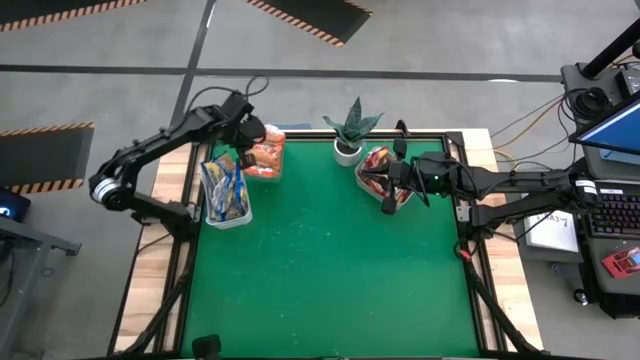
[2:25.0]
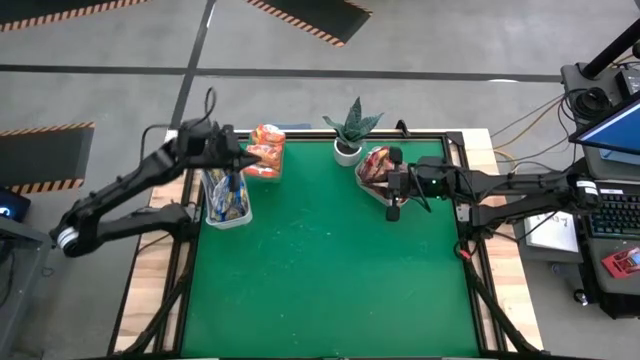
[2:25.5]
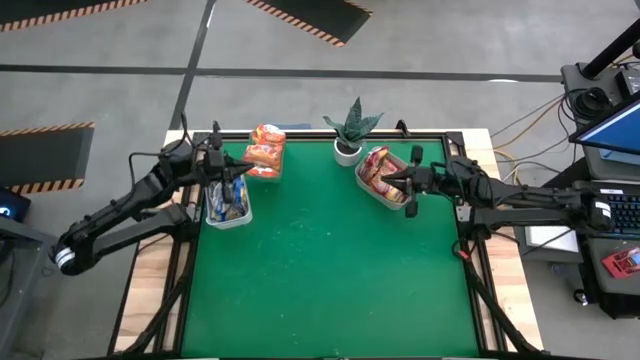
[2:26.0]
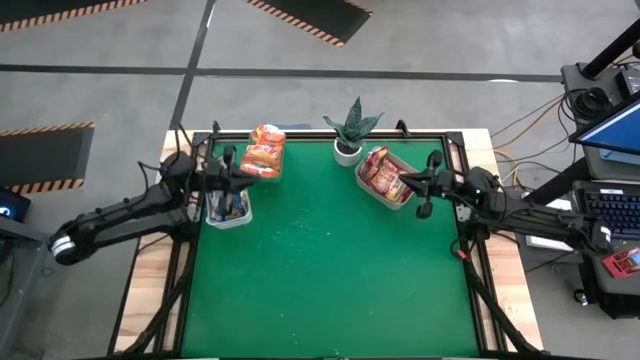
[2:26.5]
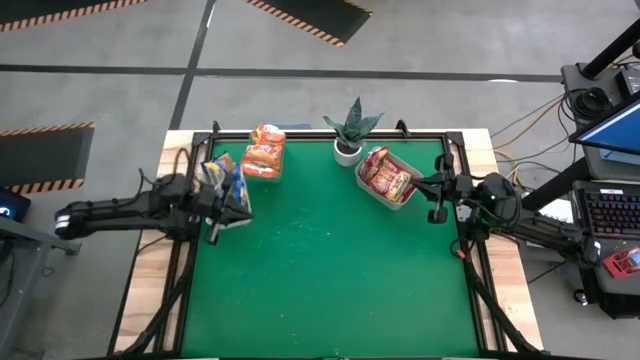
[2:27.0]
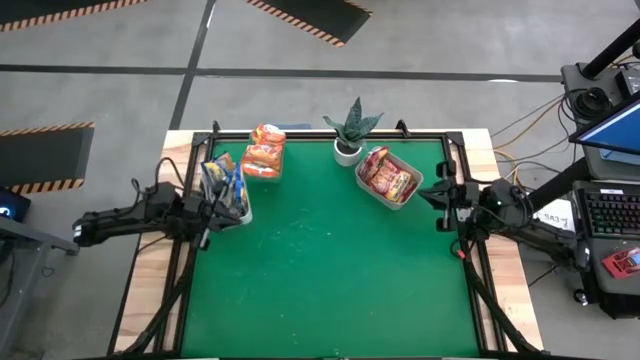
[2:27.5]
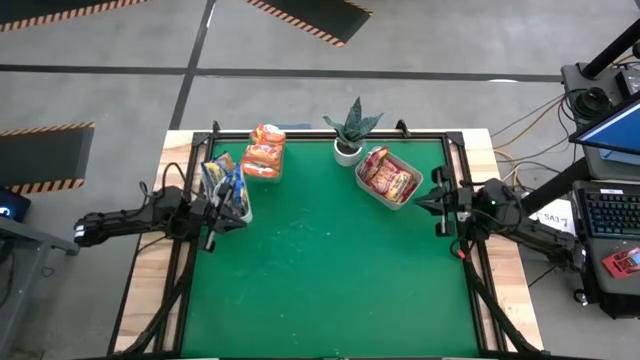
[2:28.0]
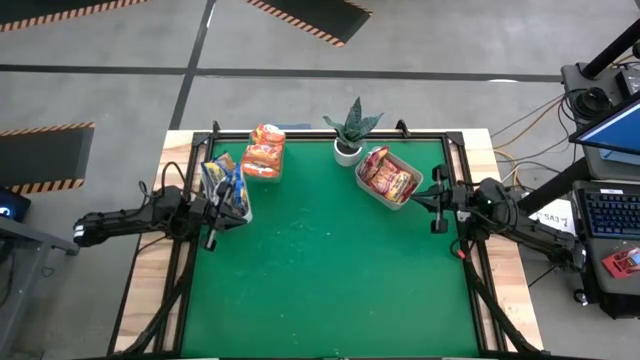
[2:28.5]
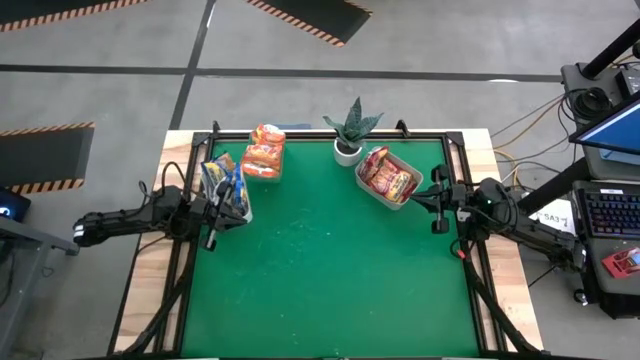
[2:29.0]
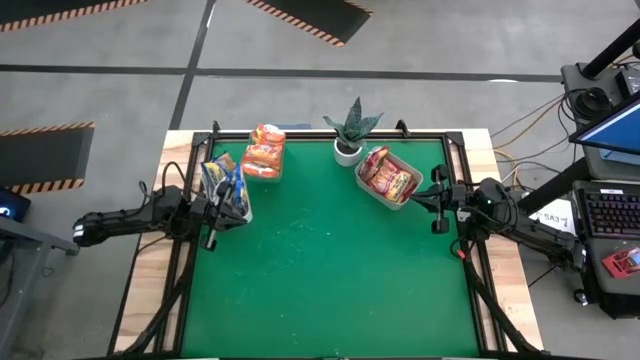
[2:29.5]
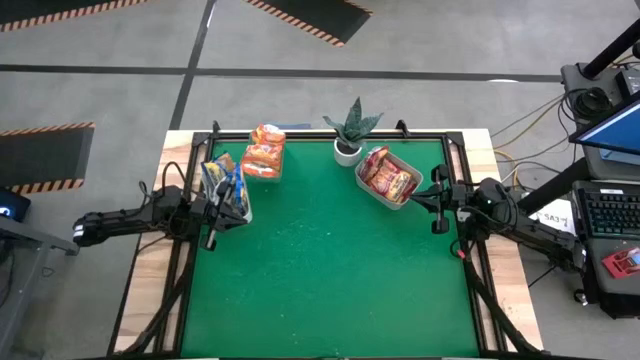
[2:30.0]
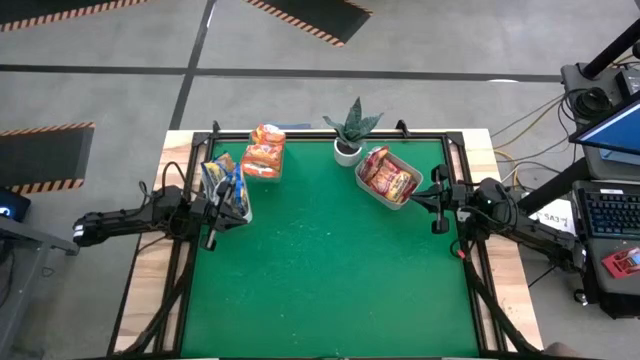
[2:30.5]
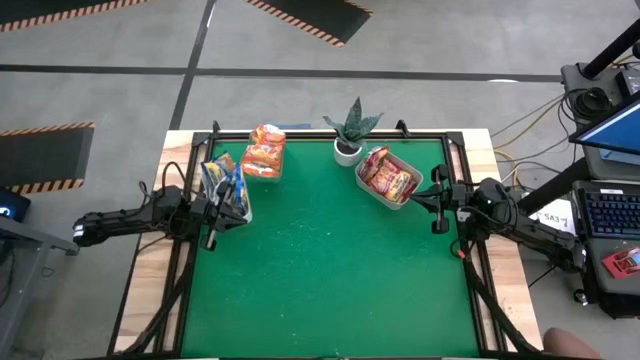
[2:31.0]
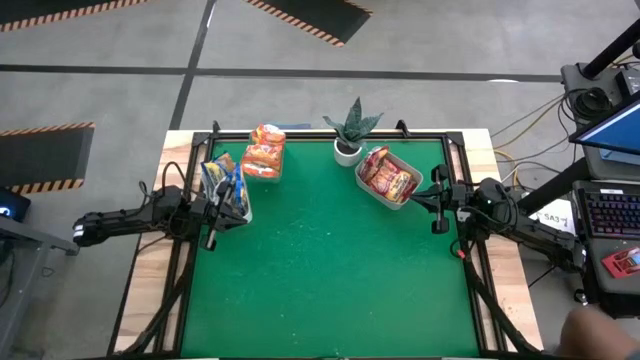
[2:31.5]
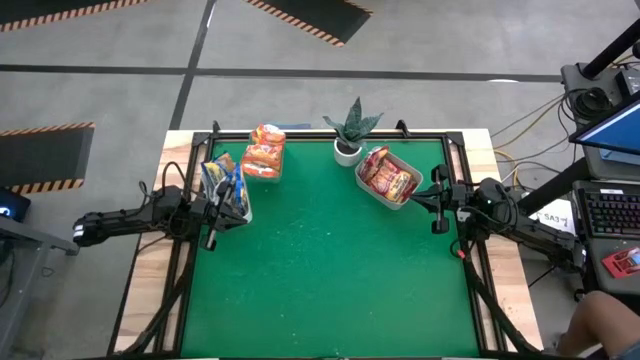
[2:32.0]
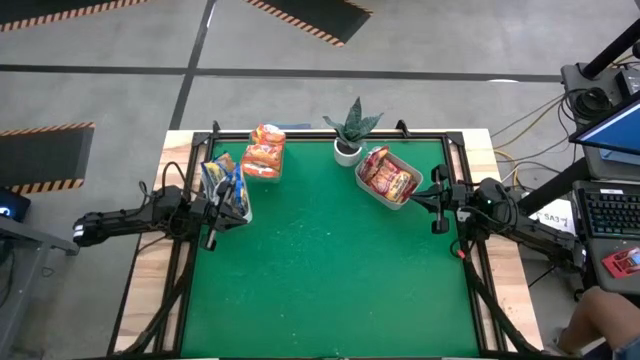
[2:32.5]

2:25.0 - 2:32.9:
Task: Sort Maruchan noodles
Return to Home Position

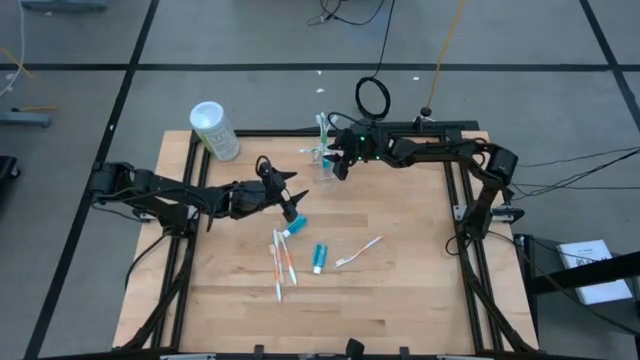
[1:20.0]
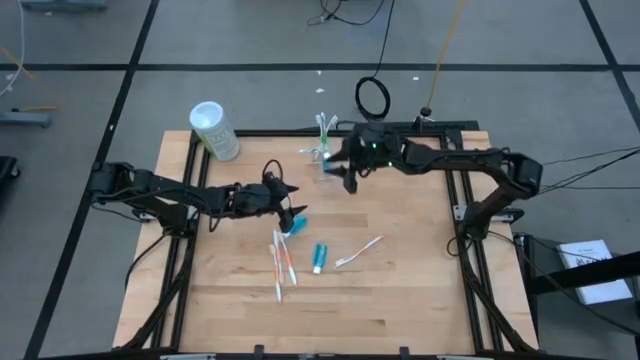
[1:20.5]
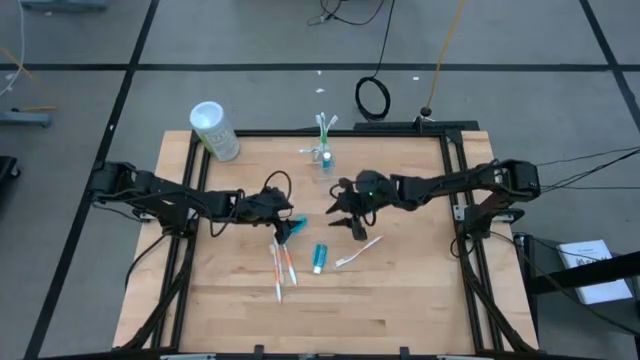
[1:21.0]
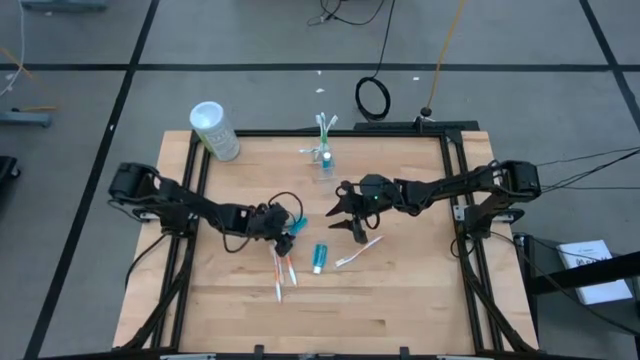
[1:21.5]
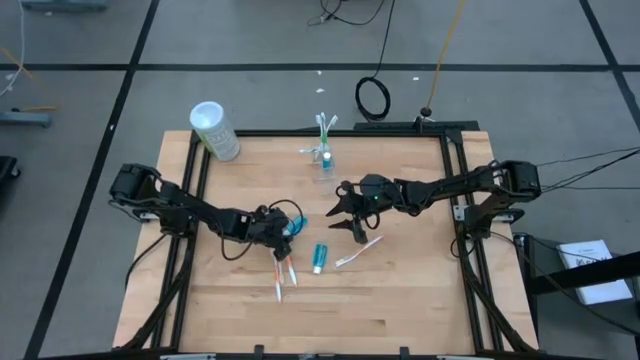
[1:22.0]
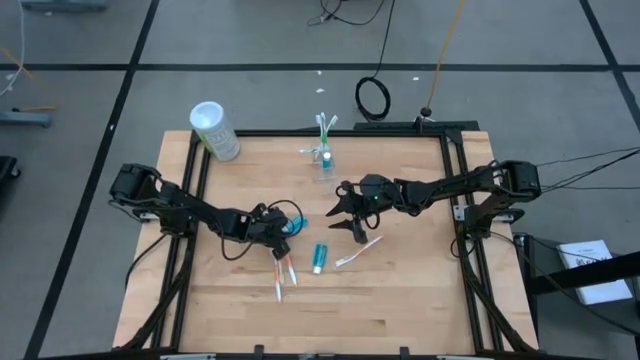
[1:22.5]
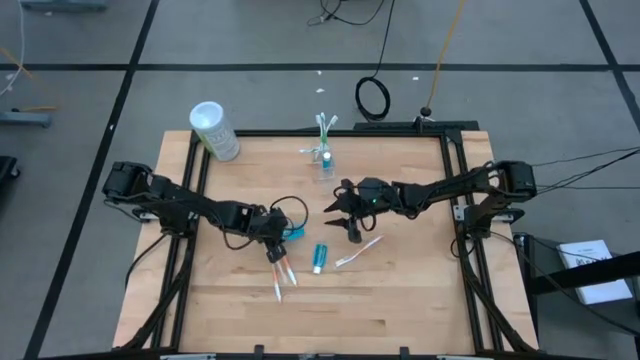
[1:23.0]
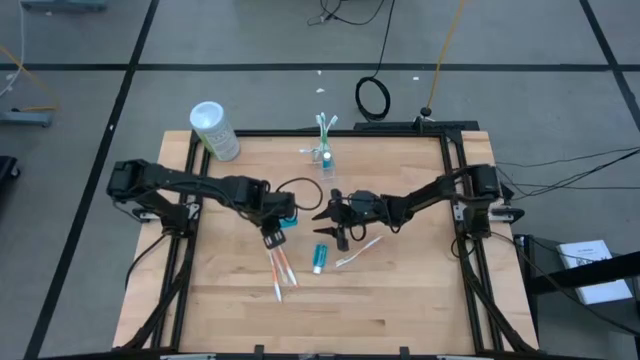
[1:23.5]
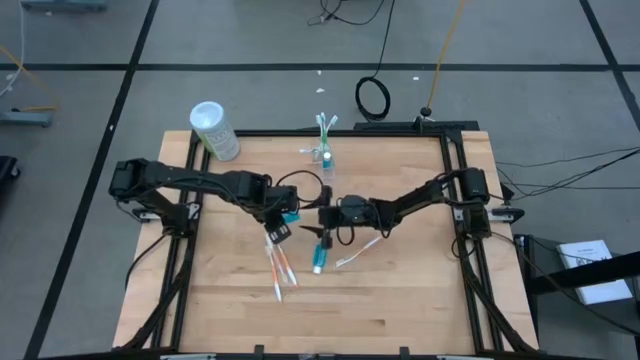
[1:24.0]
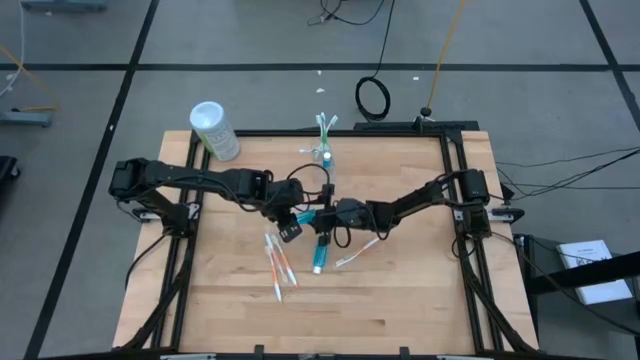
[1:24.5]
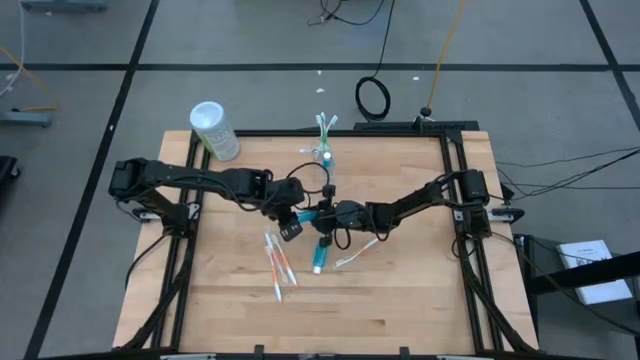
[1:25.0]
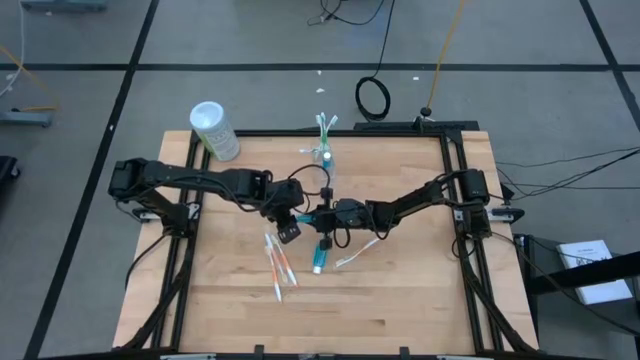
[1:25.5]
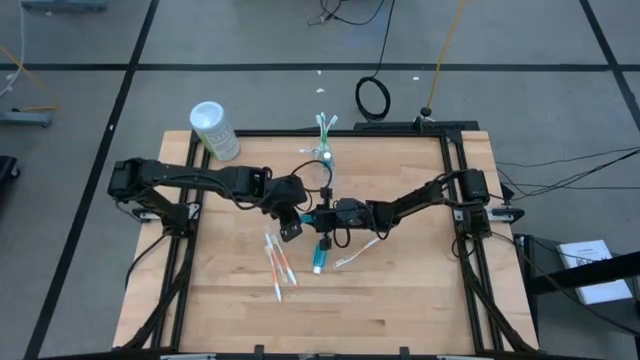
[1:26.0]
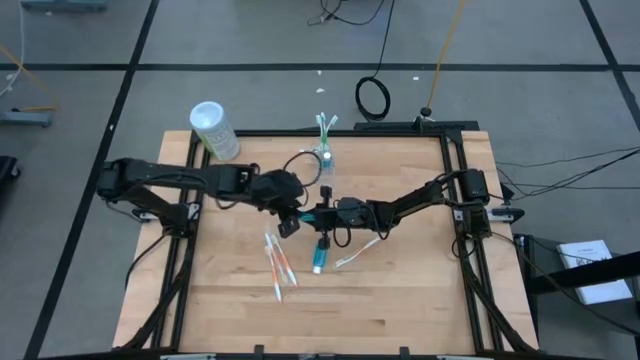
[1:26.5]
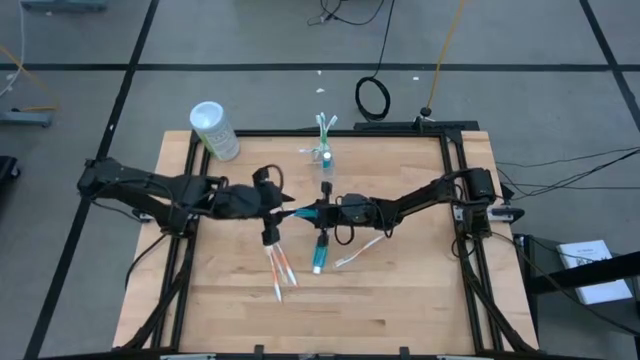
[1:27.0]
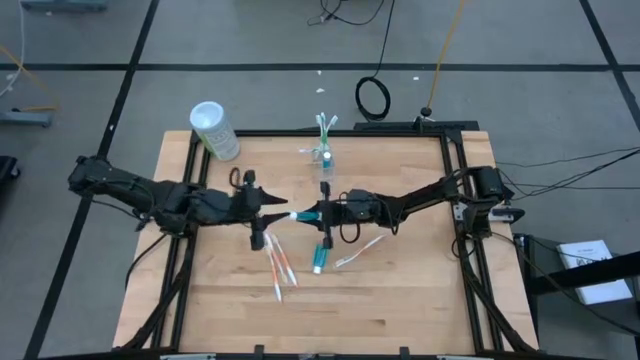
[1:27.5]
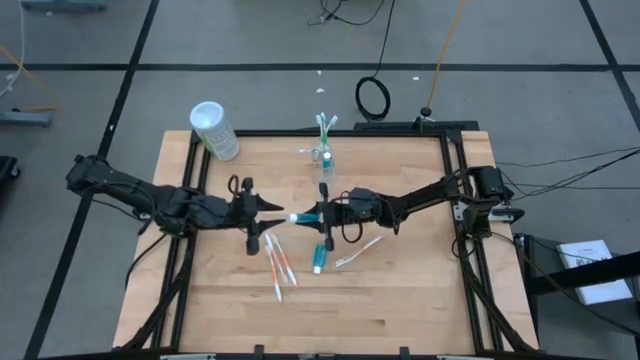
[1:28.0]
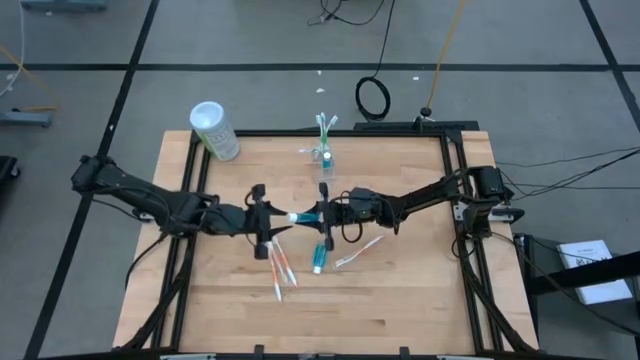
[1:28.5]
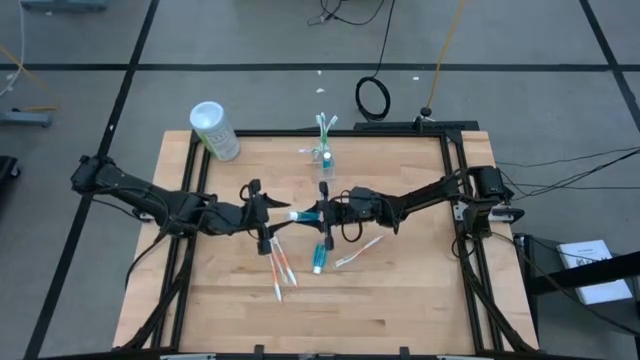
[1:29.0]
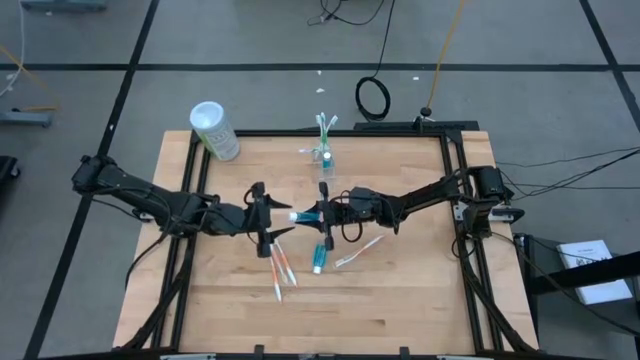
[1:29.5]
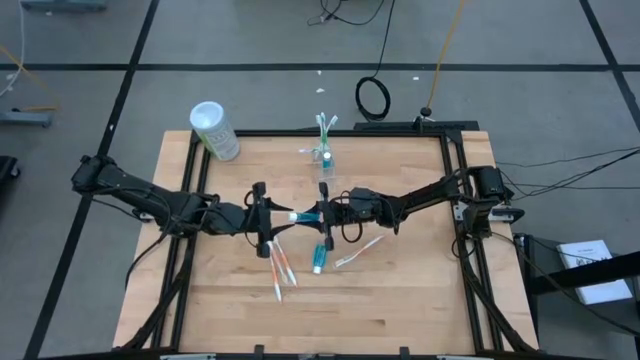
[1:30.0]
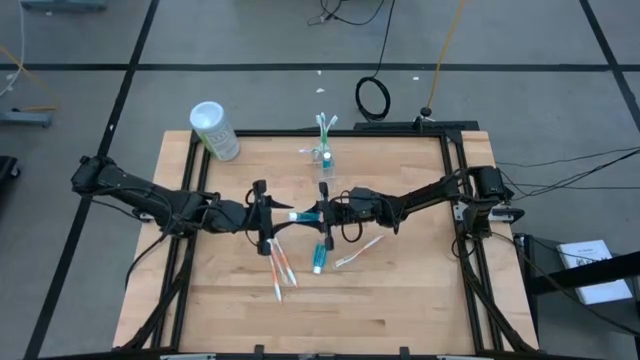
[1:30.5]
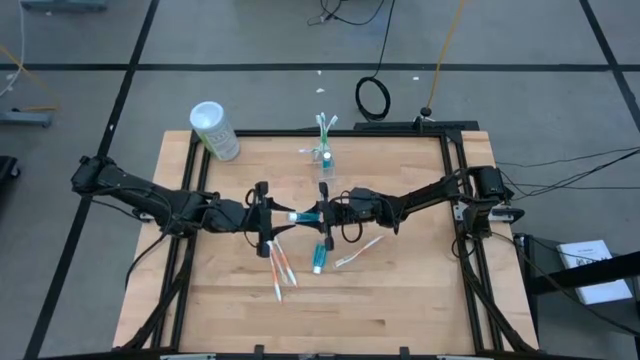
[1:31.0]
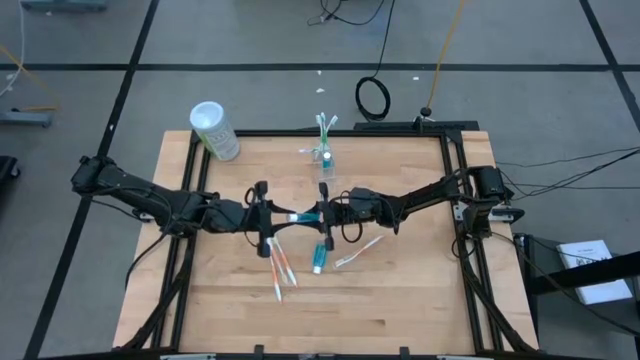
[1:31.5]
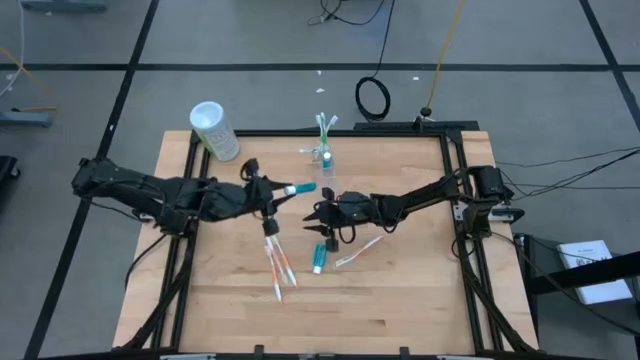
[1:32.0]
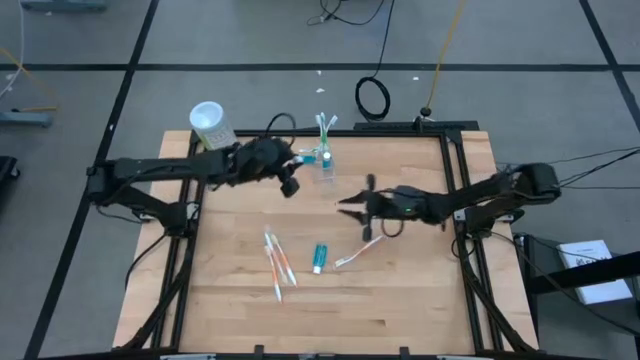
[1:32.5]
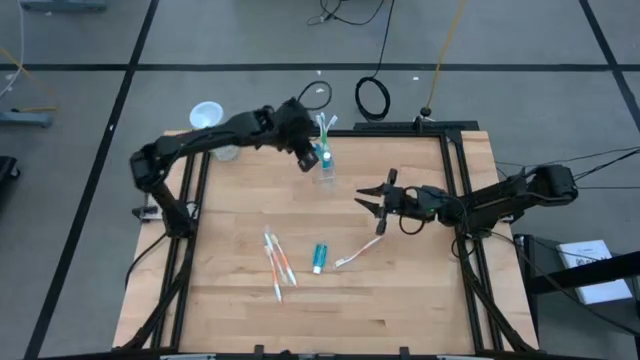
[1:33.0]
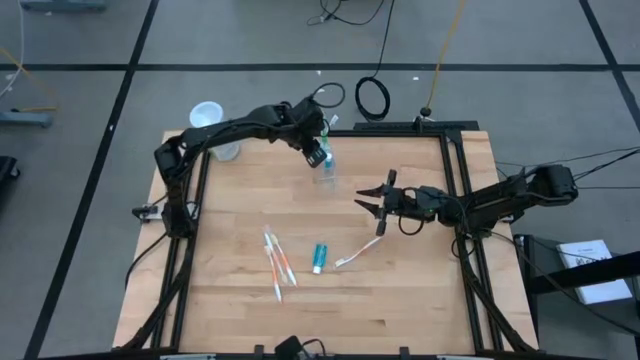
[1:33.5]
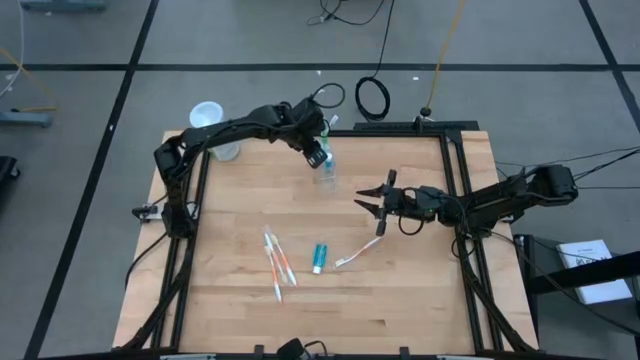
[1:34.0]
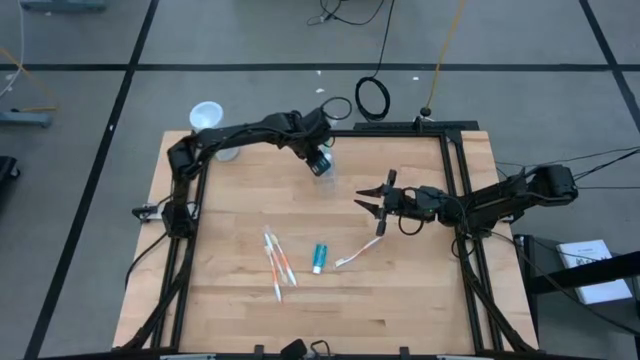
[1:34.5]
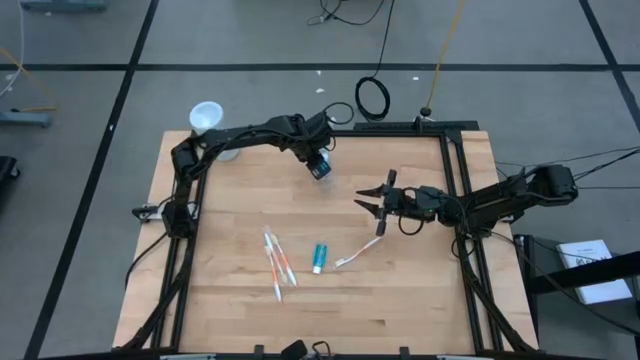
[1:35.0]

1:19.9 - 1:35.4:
Task: Pick & Place toothbrushing station
Put the blue mouthwash bottle into the transparent organizer
